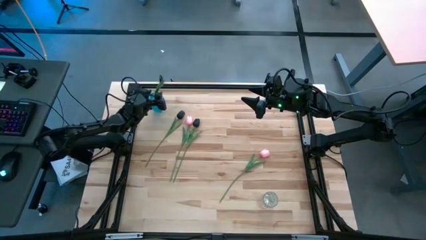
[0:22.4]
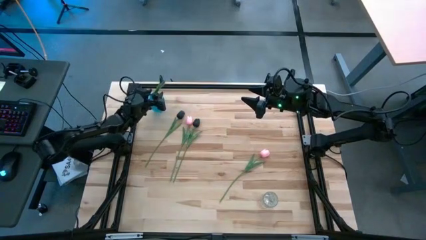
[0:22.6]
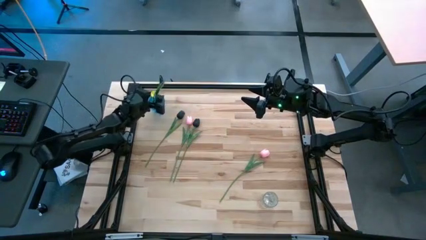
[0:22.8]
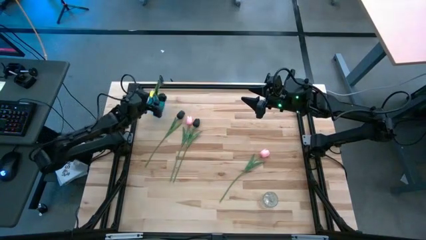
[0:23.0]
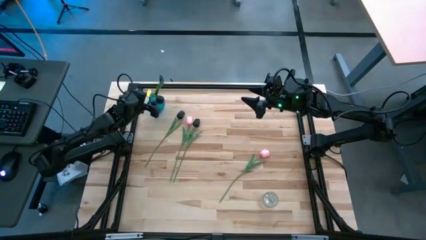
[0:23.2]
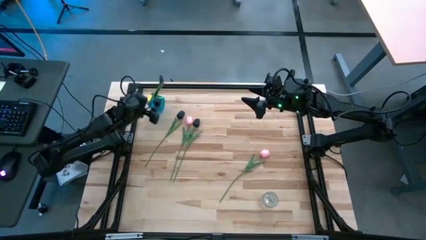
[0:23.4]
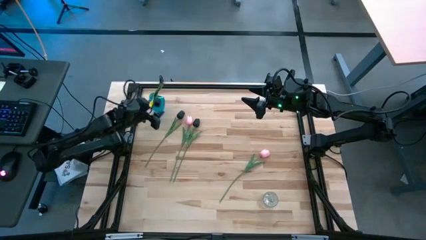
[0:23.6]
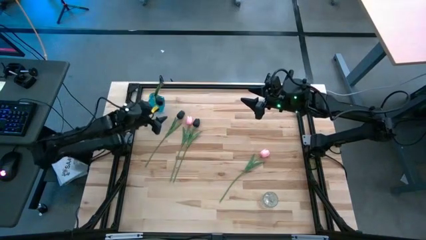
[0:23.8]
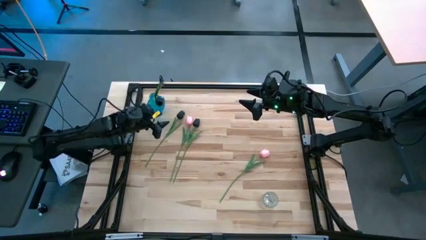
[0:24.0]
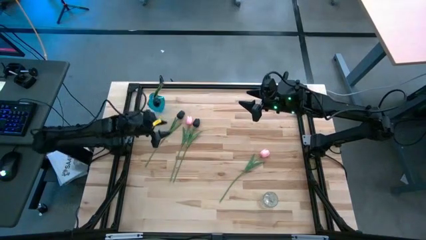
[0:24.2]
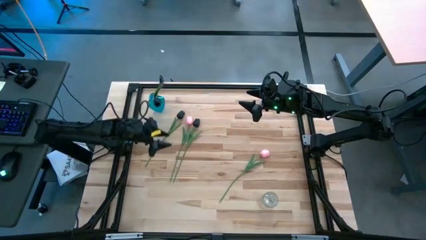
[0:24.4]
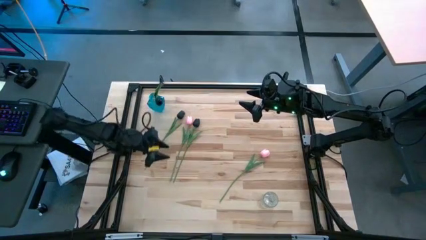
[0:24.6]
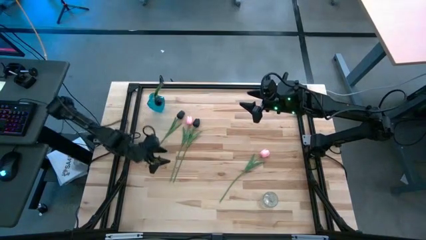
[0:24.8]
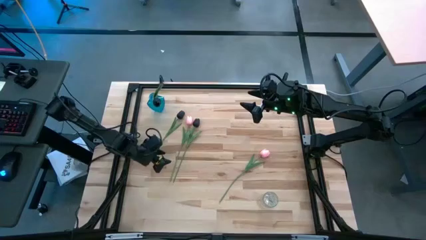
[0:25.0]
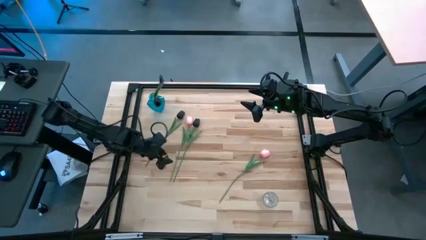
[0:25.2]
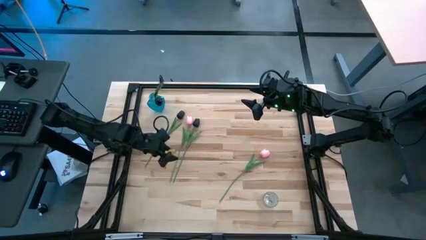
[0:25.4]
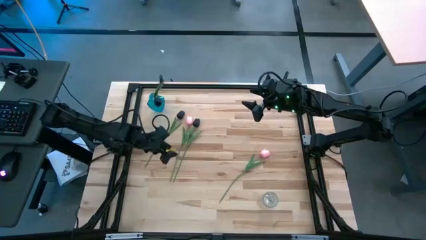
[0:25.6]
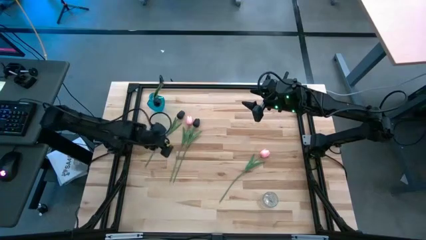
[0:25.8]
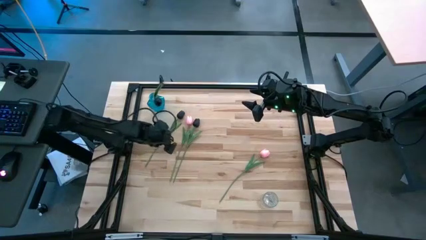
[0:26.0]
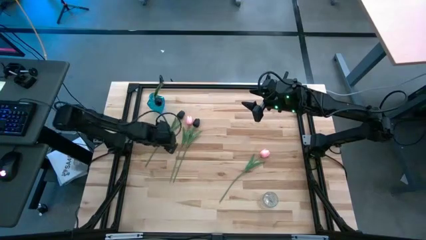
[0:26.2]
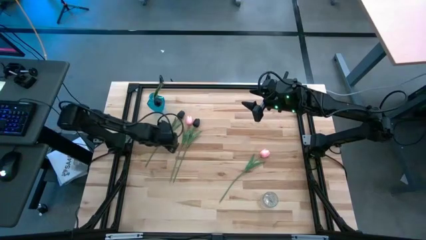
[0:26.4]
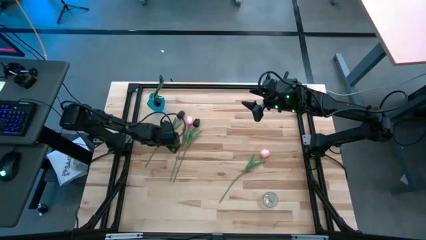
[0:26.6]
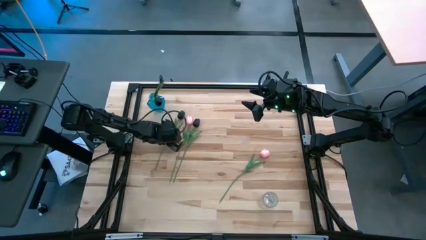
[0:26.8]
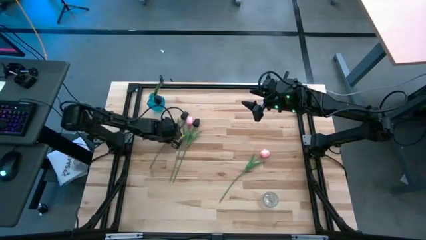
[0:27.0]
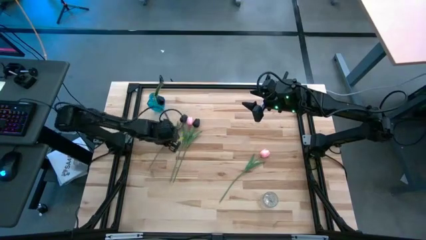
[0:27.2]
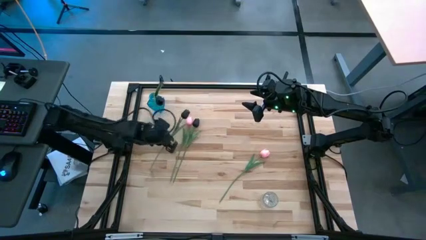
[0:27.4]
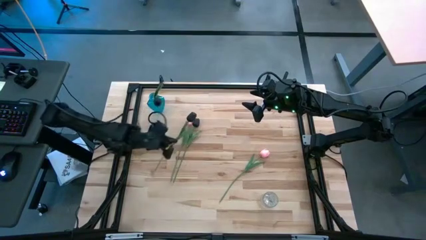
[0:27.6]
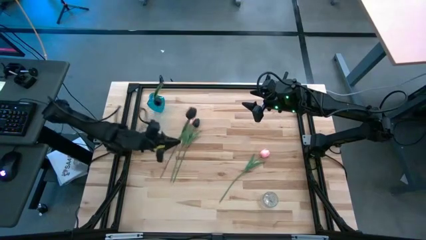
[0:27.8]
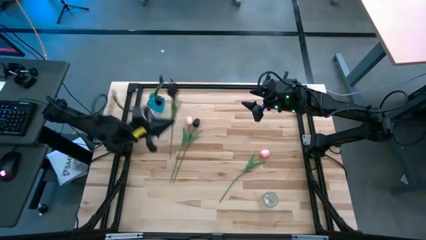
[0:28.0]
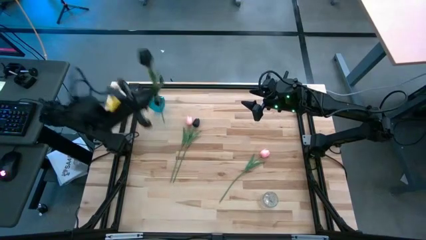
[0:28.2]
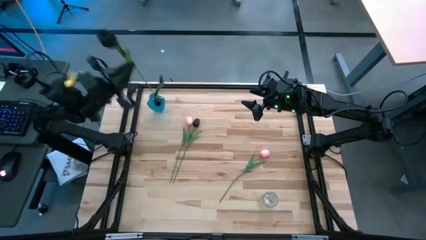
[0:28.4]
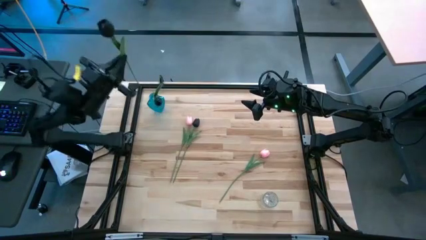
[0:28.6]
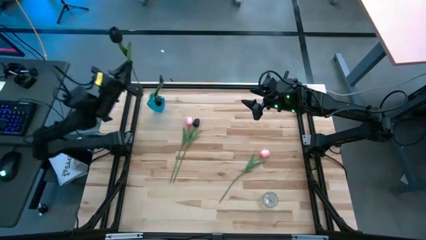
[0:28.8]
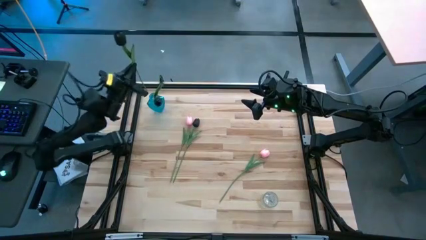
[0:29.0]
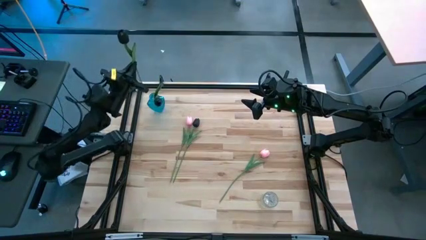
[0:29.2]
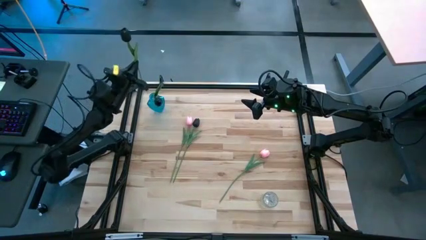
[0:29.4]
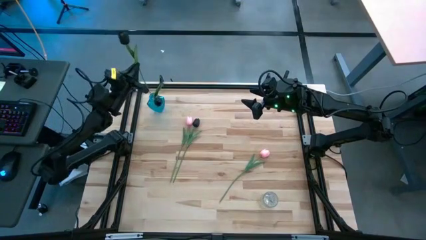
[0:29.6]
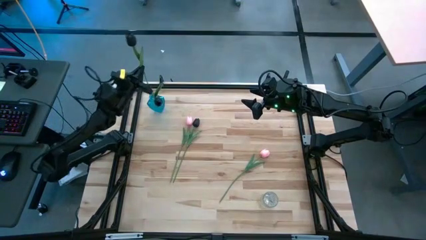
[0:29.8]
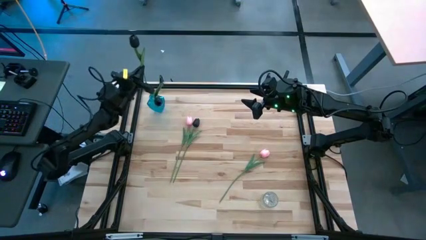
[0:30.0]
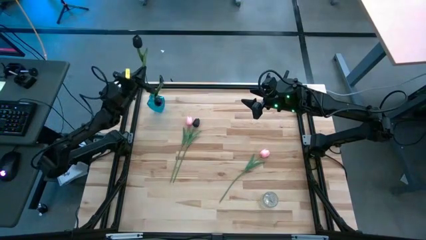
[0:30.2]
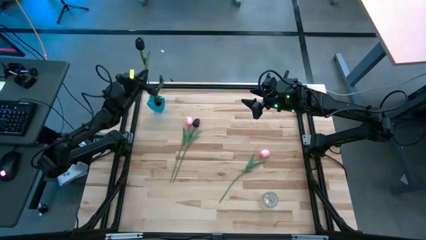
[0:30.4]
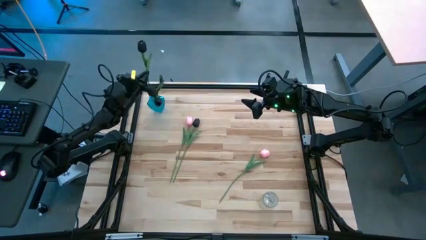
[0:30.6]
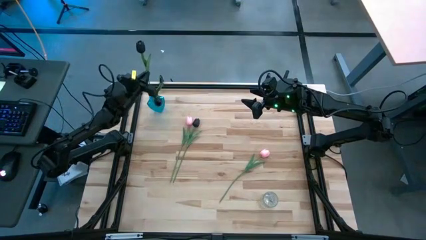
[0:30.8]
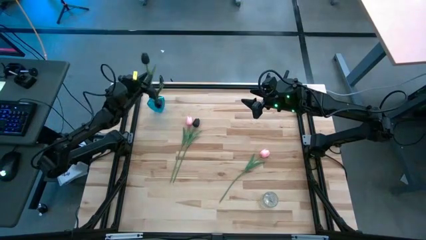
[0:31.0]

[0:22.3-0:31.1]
Task: Sort flowers into vase by color
Put the top black flower into the blue vase

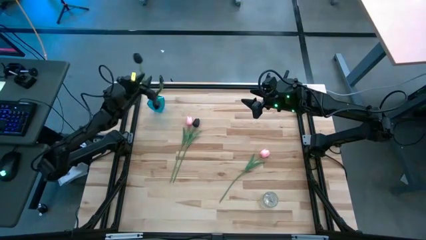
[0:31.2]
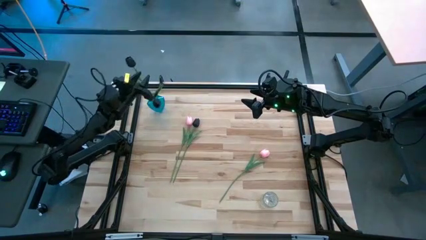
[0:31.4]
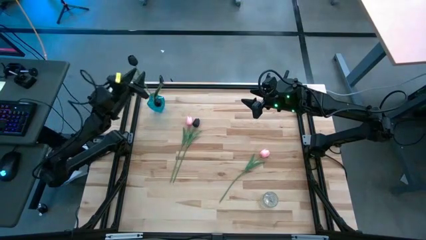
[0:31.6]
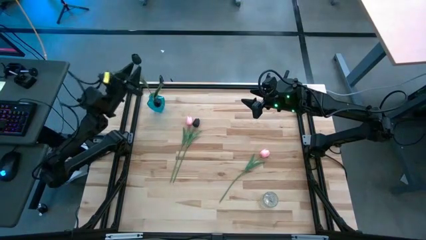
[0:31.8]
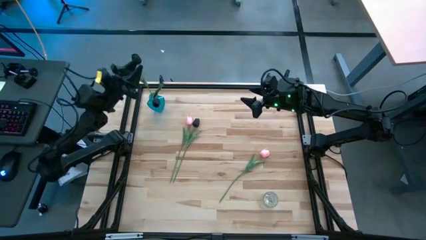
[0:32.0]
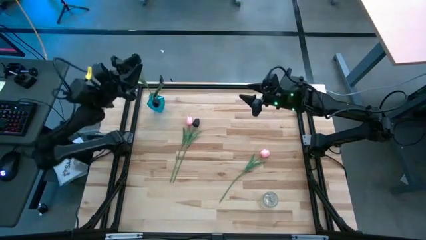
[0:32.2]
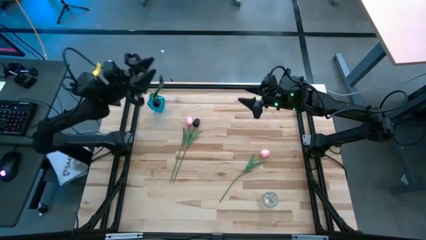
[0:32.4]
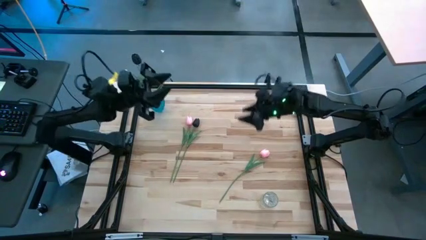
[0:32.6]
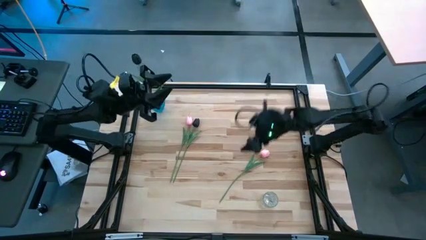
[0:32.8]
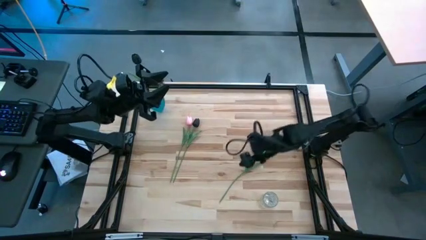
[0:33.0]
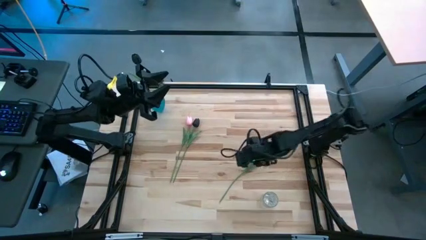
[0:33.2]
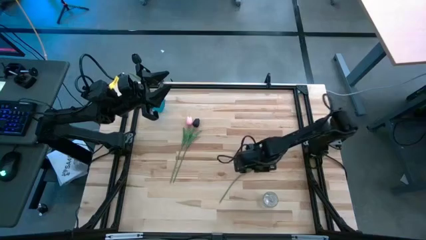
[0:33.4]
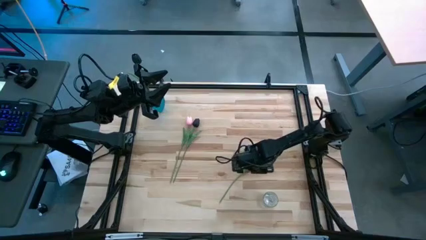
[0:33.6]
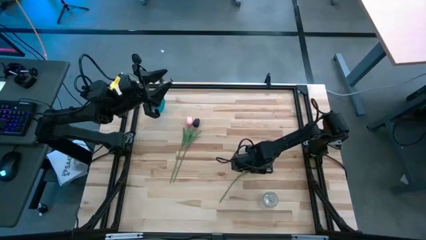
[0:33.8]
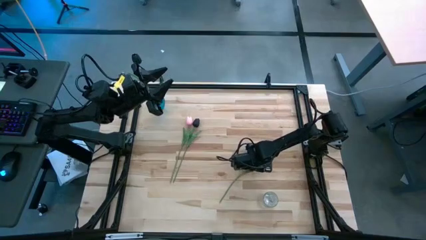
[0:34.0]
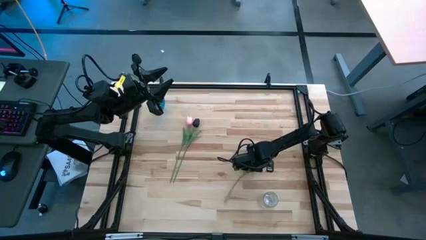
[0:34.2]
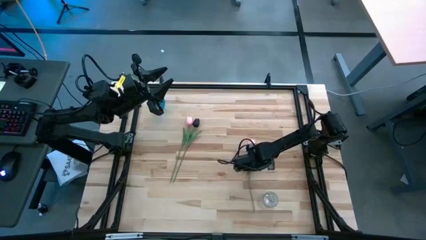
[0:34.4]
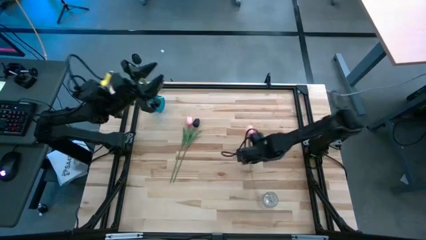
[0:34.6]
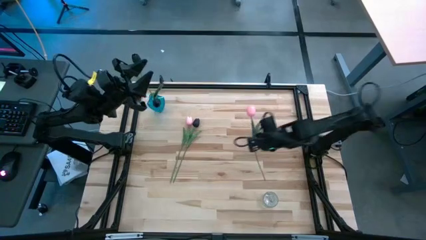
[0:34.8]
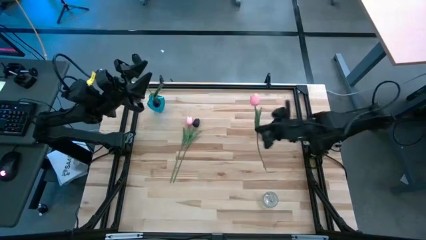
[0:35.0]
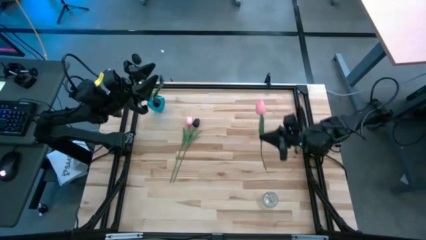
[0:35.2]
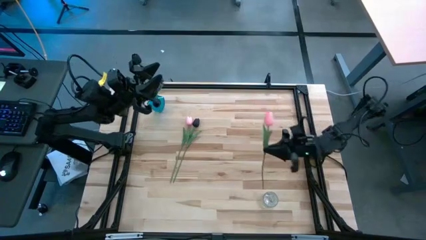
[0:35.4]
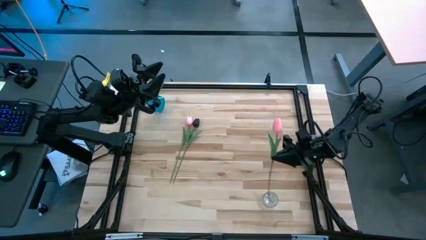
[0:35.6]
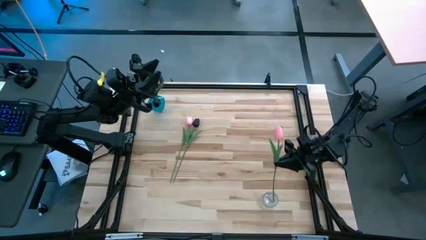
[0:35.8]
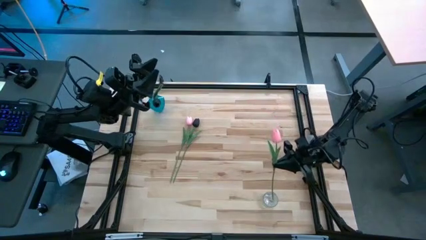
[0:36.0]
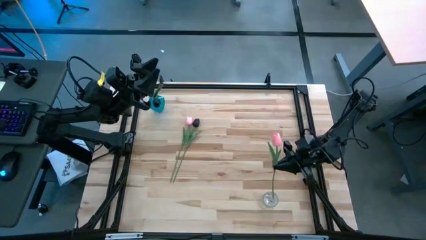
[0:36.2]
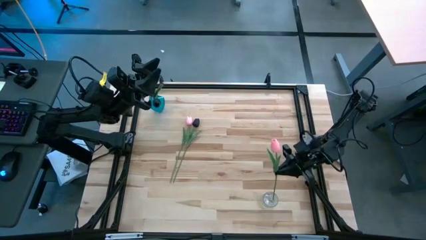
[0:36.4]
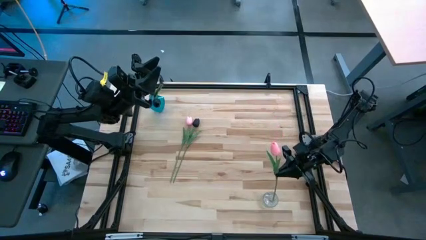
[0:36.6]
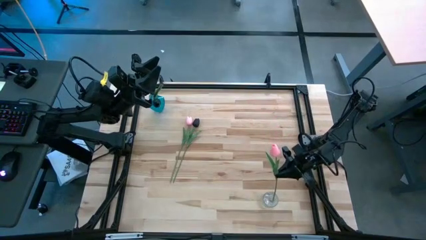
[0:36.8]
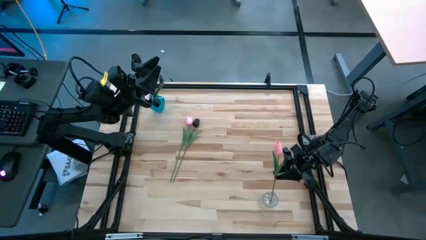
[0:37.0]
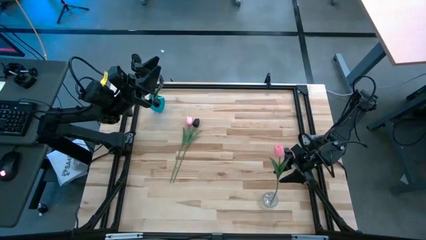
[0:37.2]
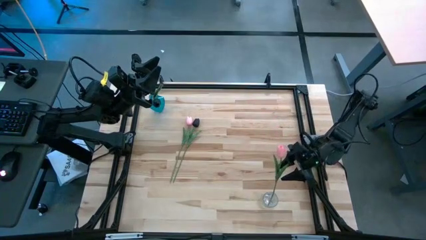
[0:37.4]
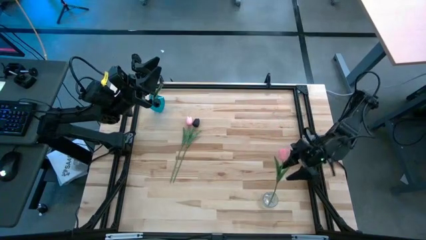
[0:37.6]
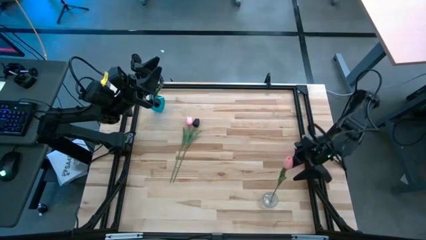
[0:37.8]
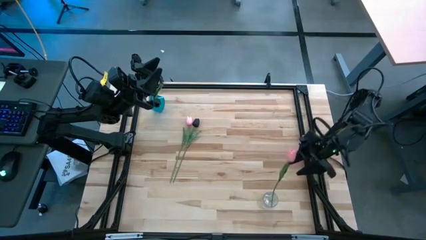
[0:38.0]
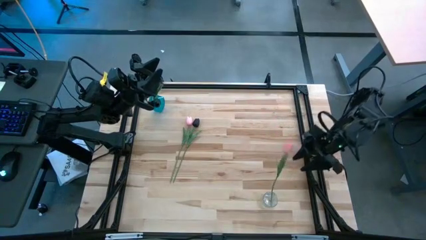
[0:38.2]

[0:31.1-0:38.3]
Put the right pink flower into the transparent vase

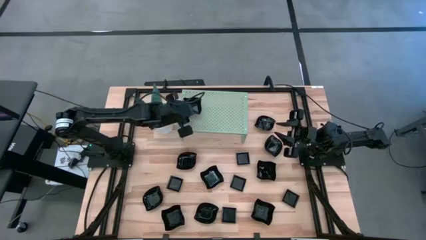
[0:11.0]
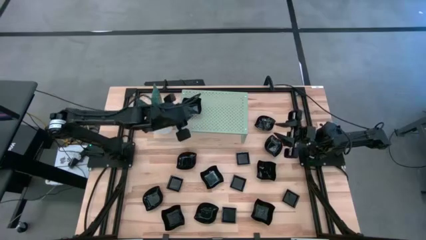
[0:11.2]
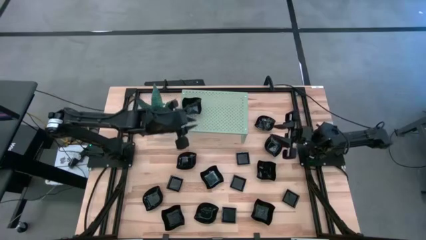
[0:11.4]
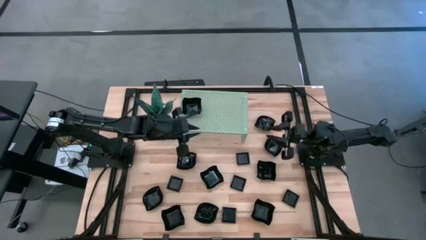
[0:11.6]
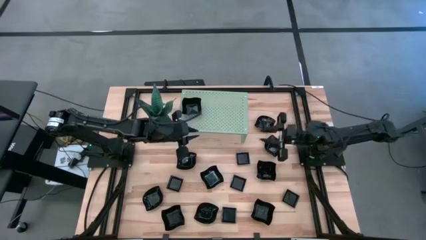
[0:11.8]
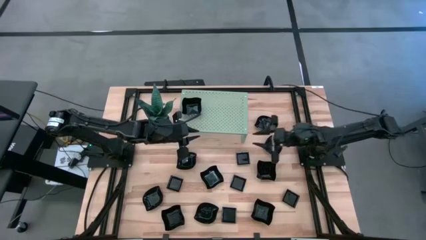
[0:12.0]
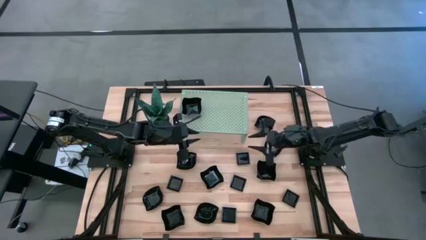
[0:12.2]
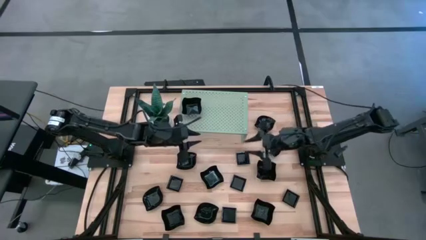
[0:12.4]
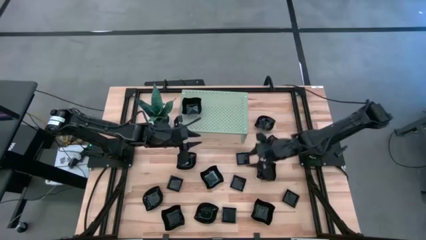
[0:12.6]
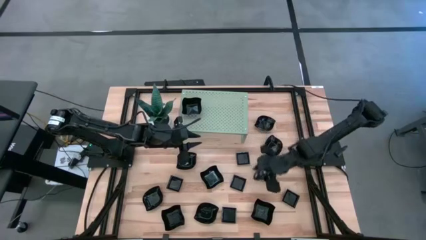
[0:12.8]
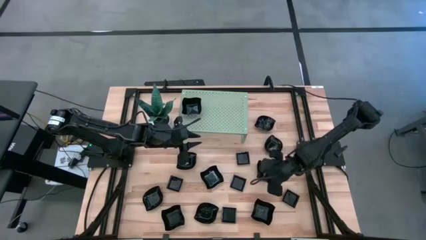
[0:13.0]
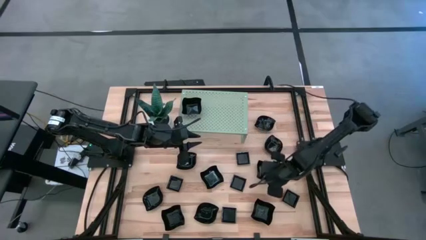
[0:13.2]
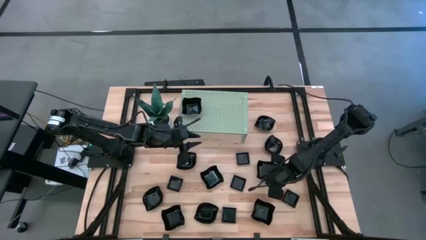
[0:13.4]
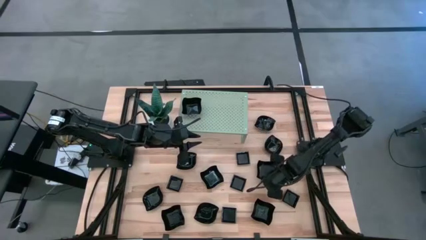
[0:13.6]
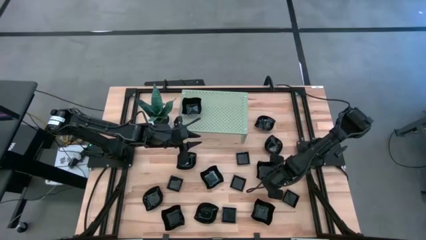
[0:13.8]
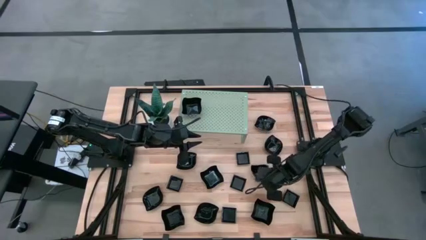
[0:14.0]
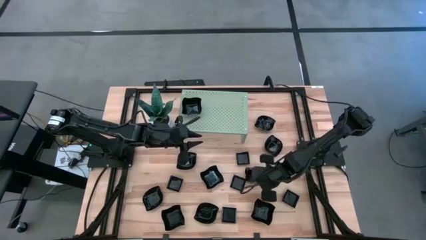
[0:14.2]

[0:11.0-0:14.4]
Task: Pick & Place Mini shaped plates
Stack the distorted square plate on top of the other distorted square plate on the shelf
